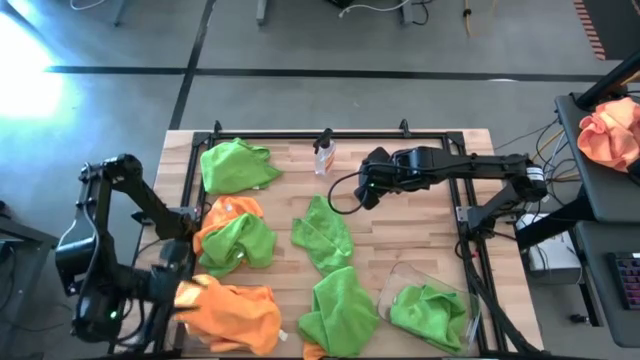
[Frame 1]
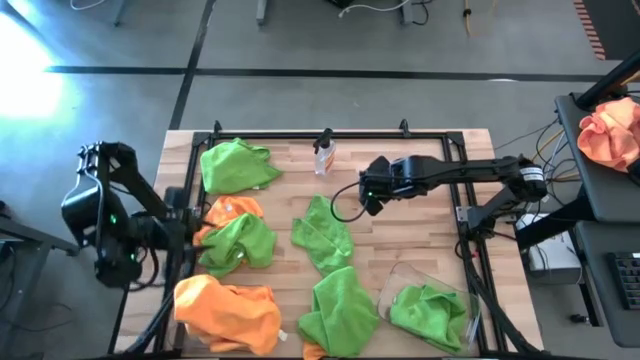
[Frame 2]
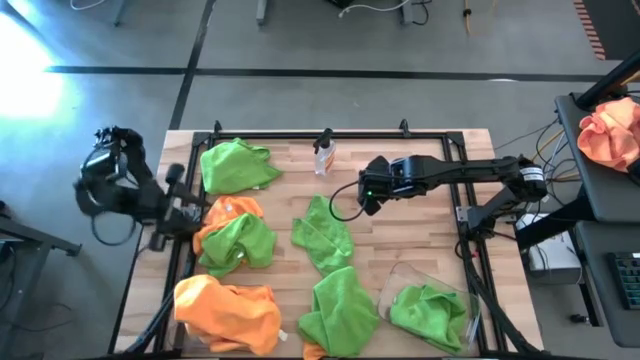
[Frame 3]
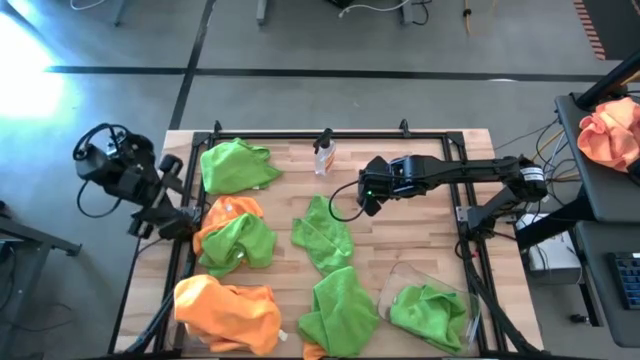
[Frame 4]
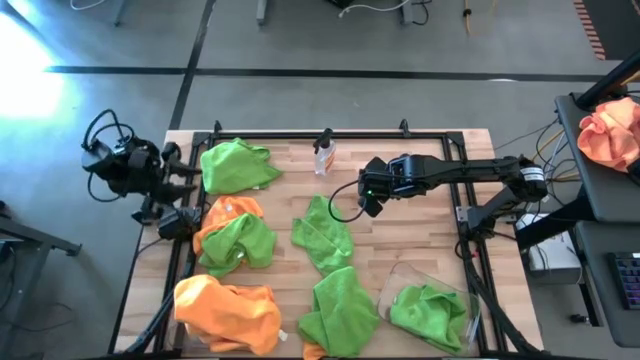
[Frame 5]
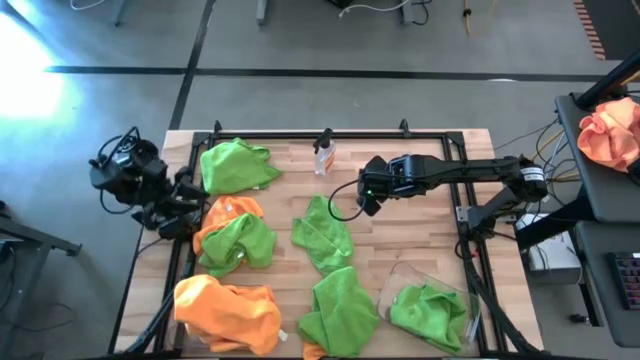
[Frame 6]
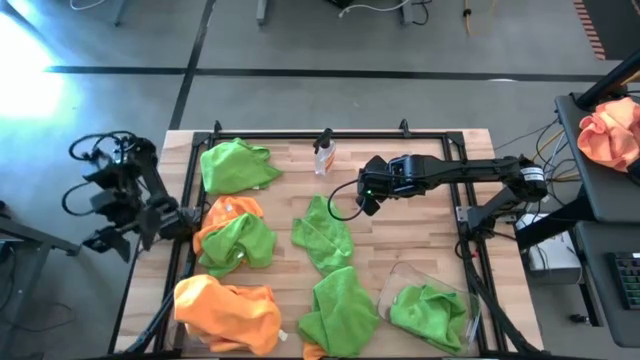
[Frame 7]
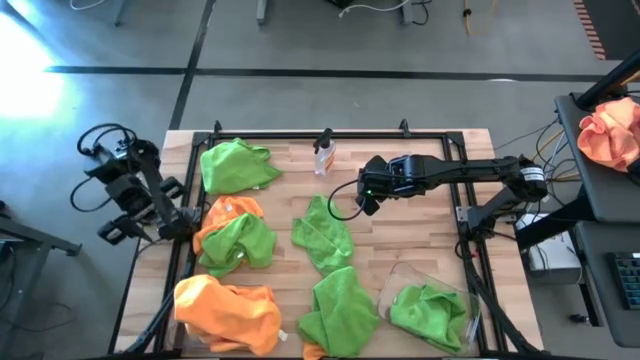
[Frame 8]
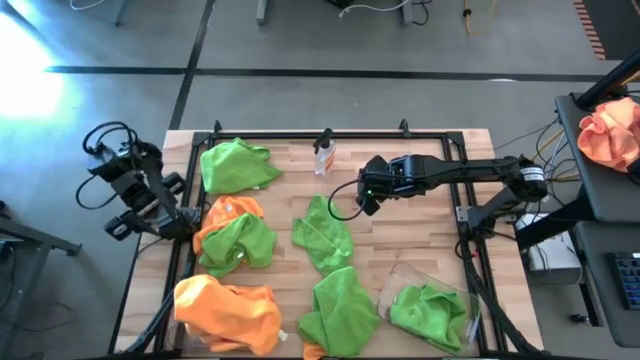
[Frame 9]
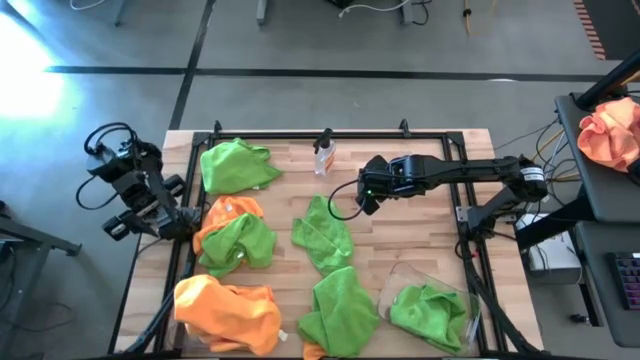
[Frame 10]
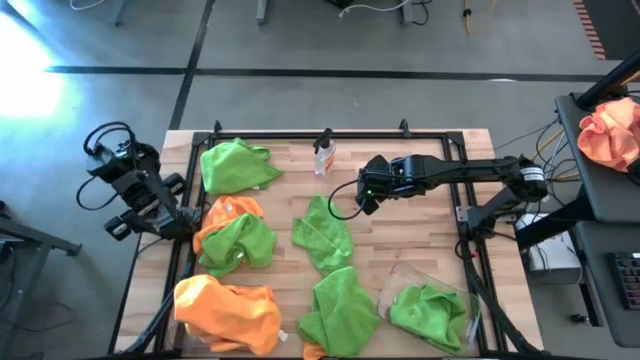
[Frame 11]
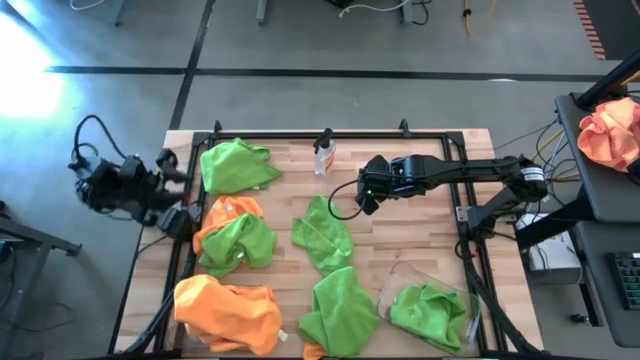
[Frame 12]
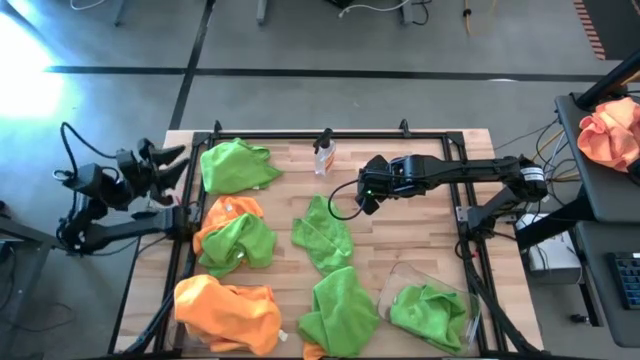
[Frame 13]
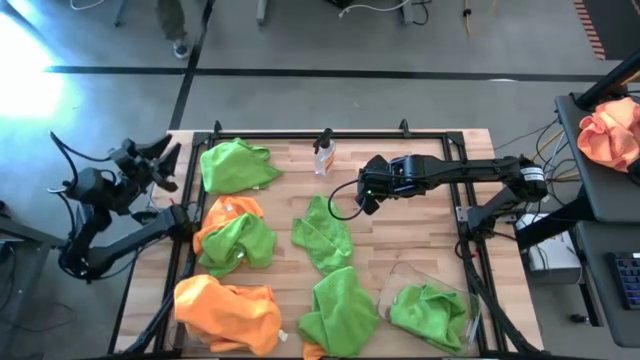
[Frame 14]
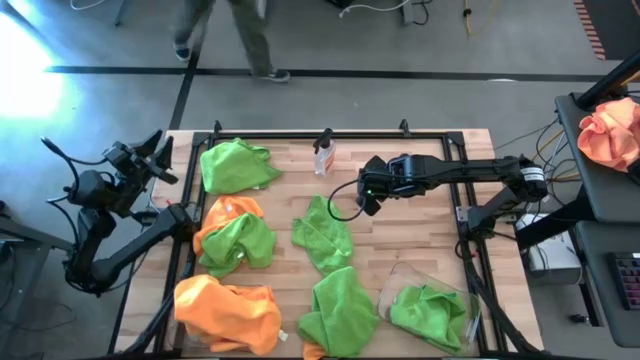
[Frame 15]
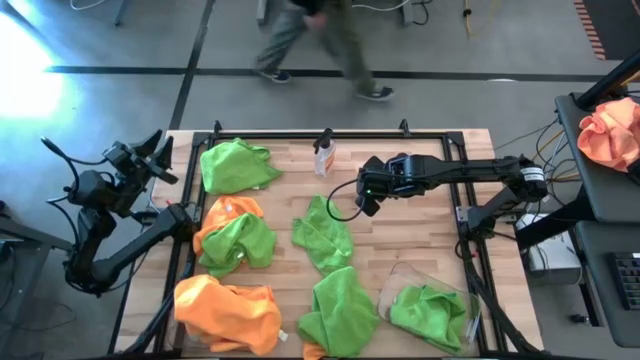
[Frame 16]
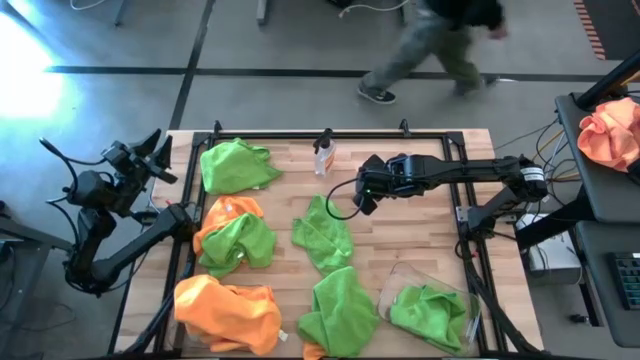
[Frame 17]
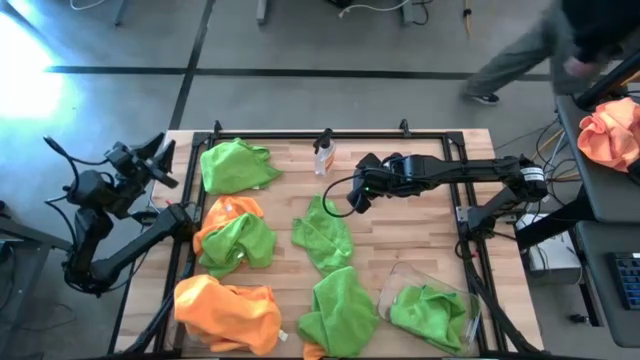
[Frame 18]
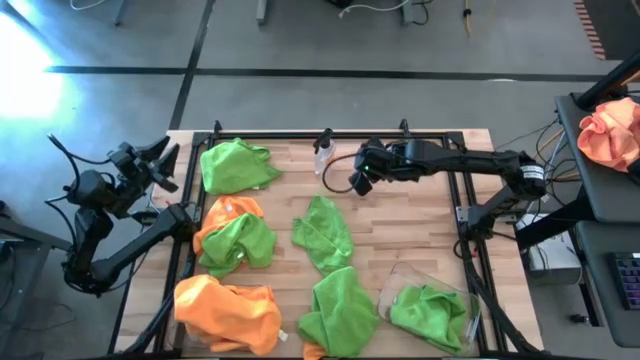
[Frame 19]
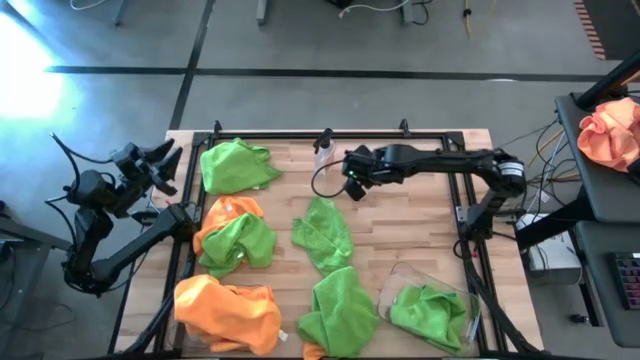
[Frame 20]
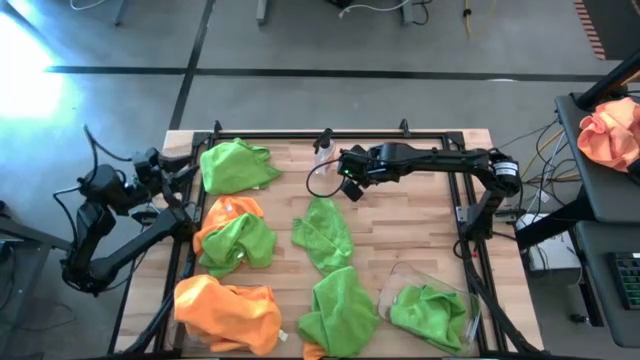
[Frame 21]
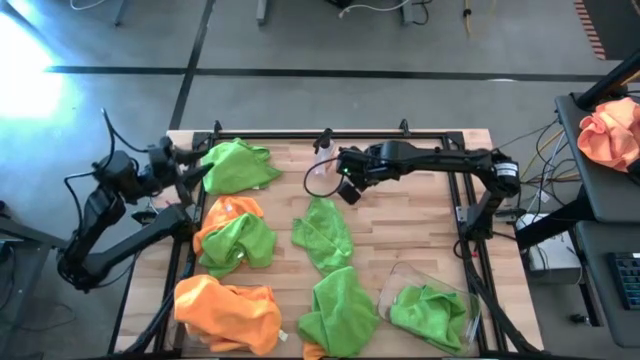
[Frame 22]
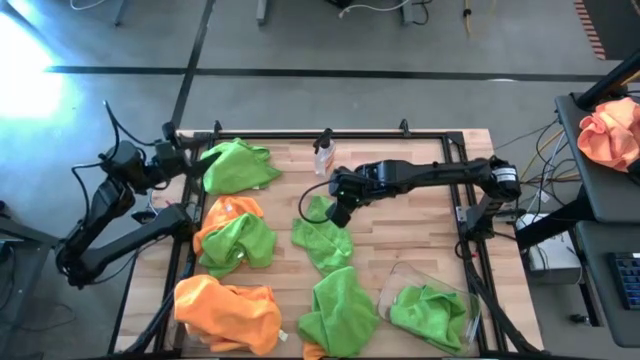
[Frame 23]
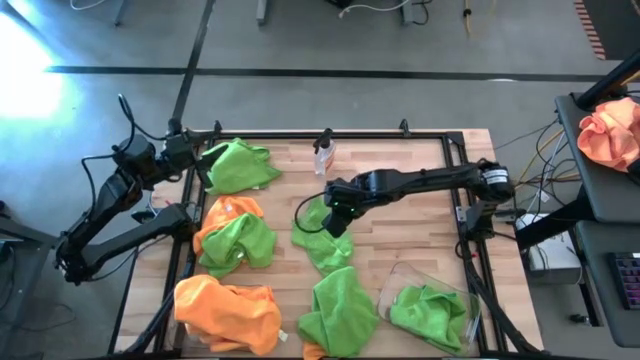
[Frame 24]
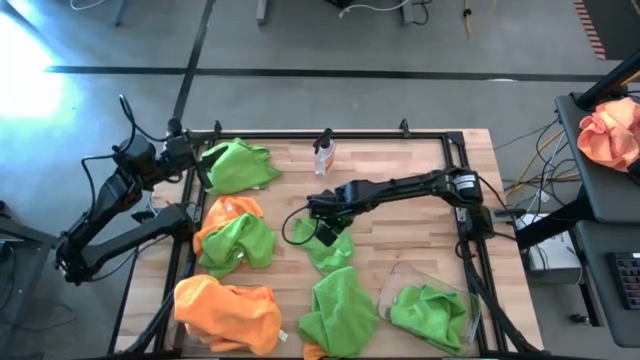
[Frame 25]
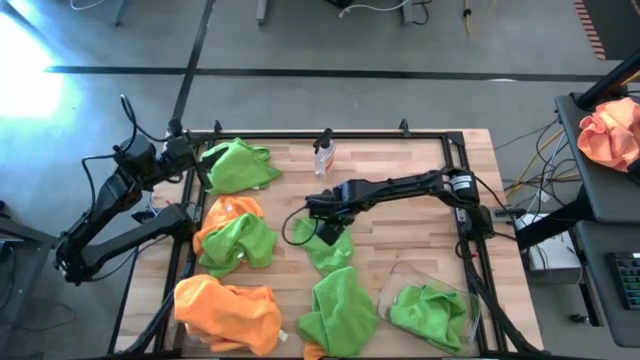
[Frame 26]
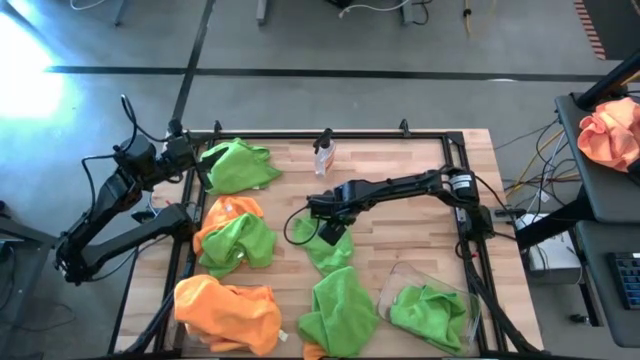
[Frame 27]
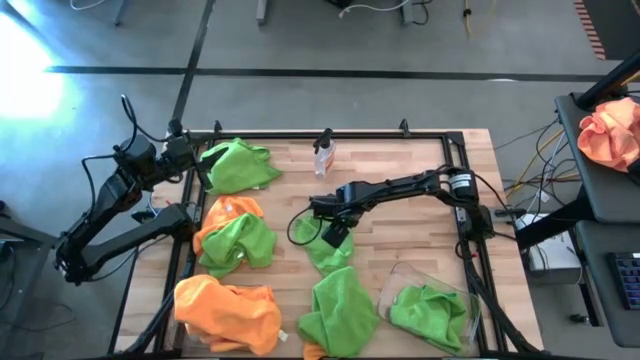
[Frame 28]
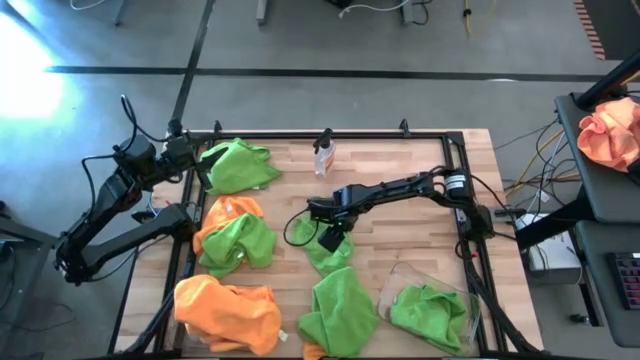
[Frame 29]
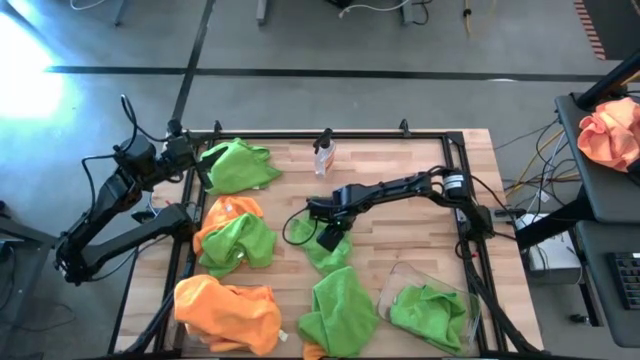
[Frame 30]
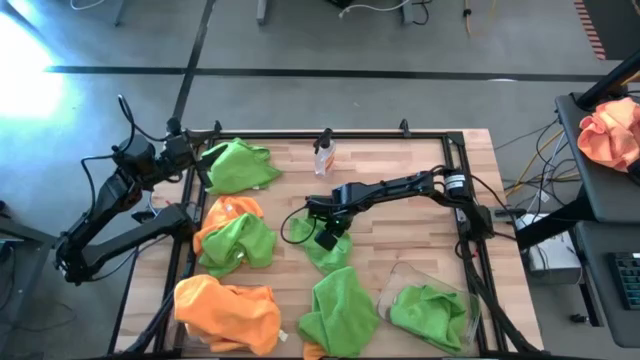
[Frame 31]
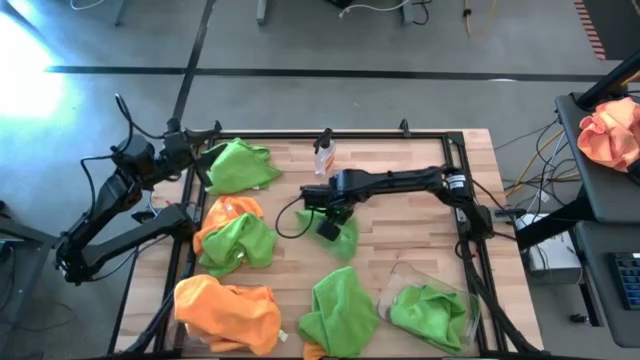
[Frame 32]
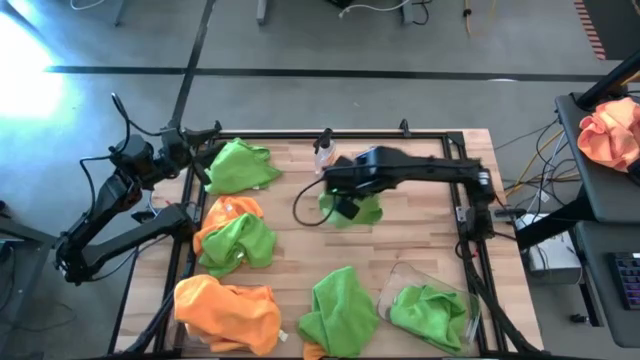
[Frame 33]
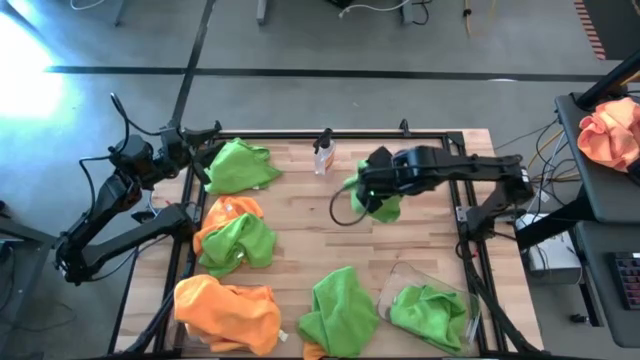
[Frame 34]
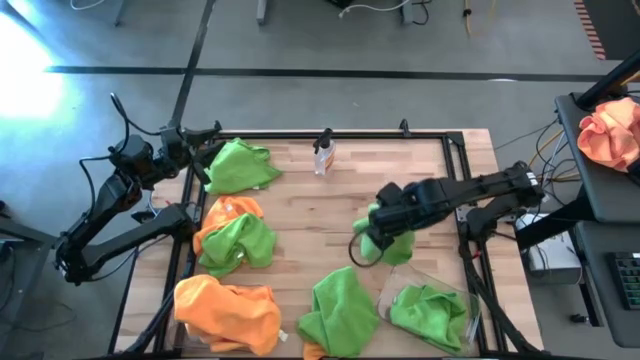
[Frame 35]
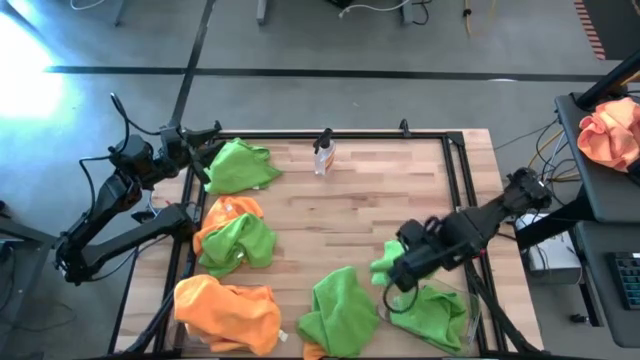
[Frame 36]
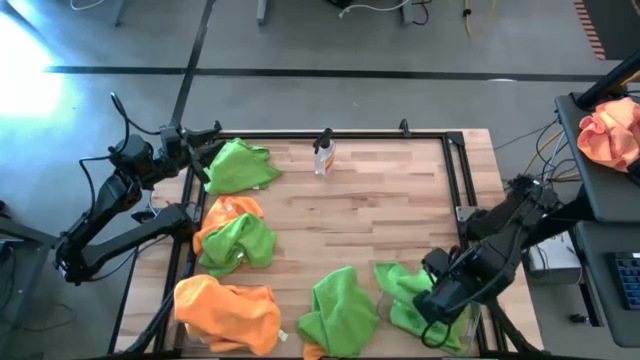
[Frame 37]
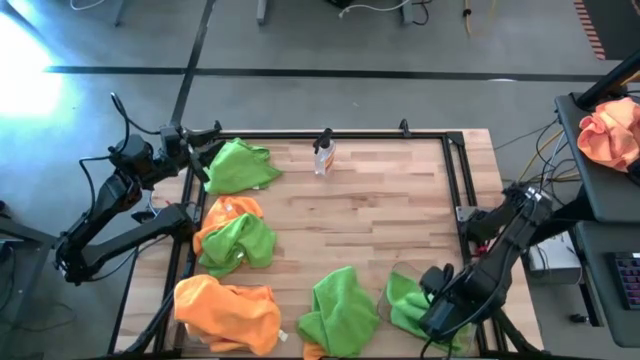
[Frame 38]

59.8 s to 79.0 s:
Task: Sort microfiber towel by color & place in baskets
Put the green microfiber cloth into the right transparent bin

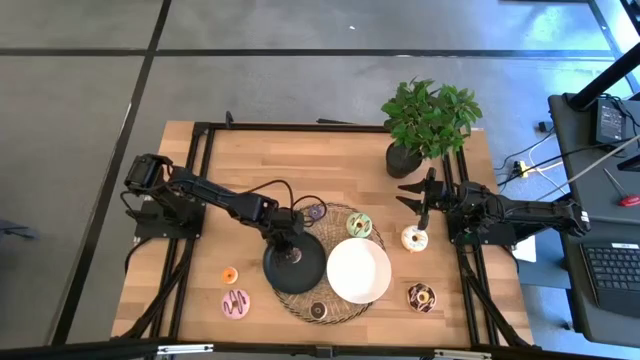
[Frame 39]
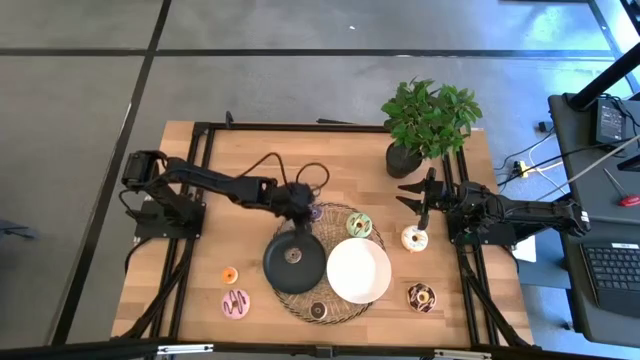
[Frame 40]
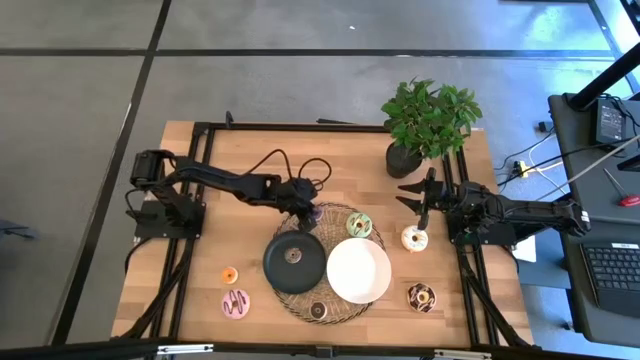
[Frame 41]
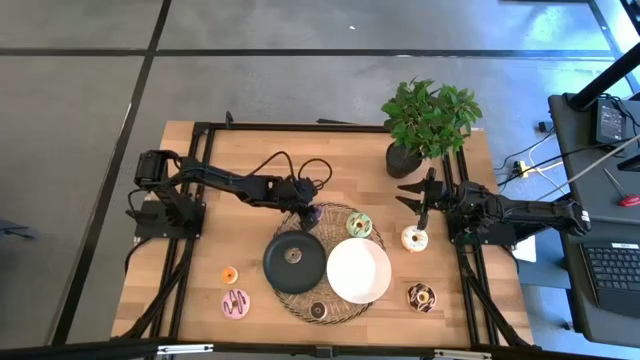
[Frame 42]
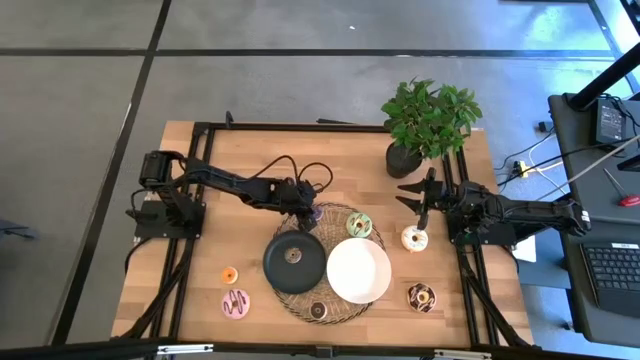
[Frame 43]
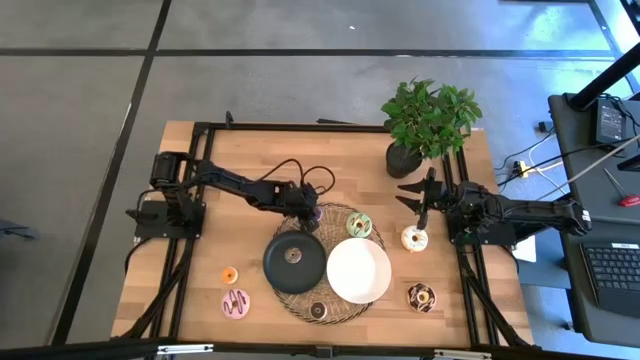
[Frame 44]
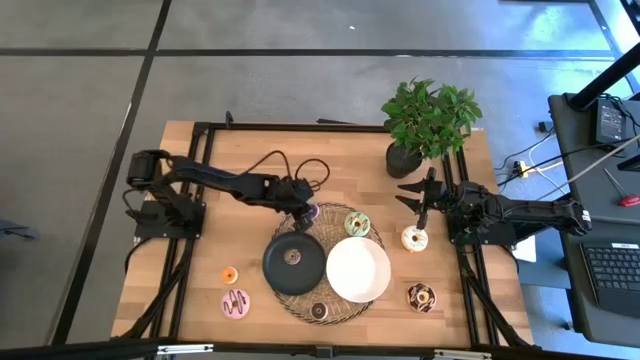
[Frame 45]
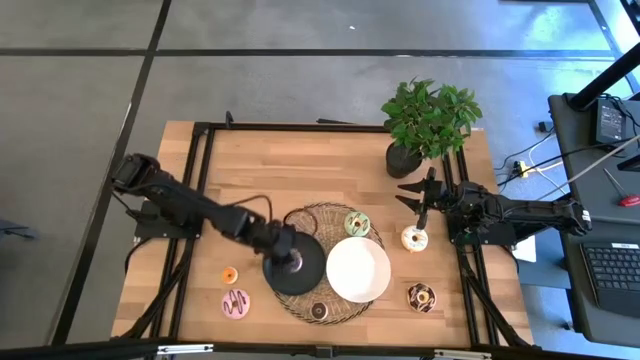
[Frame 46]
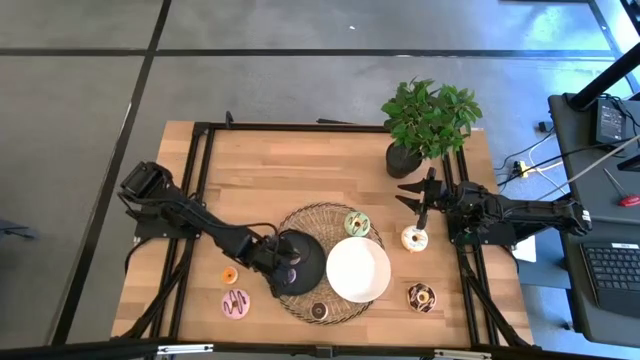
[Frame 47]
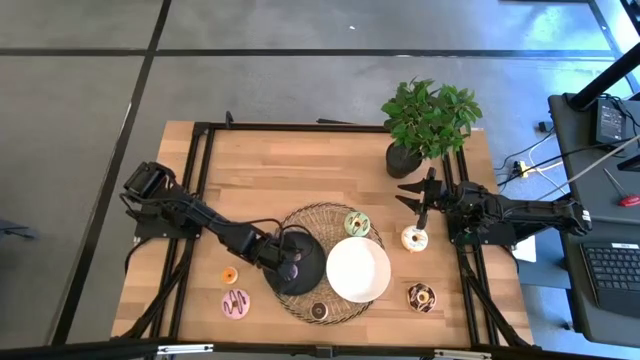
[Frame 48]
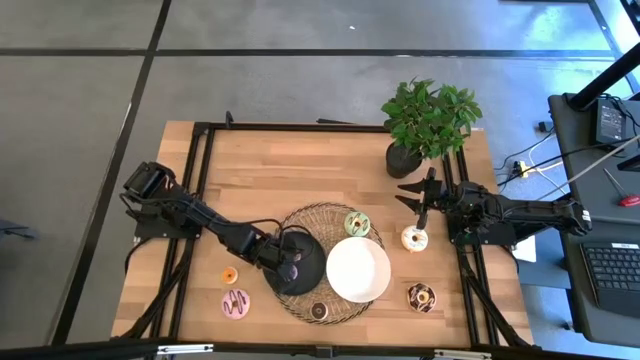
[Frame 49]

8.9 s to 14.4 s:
Task: Pick & Place donuts
Put the small blue donut into the black plate
